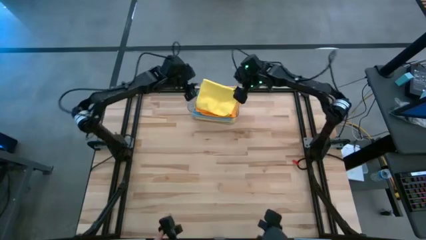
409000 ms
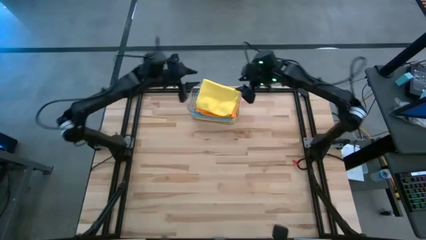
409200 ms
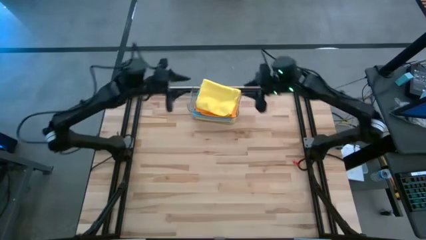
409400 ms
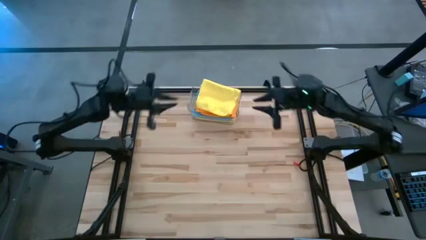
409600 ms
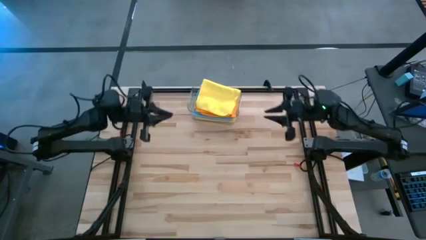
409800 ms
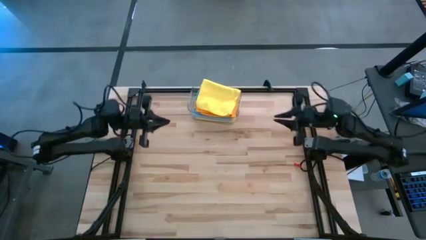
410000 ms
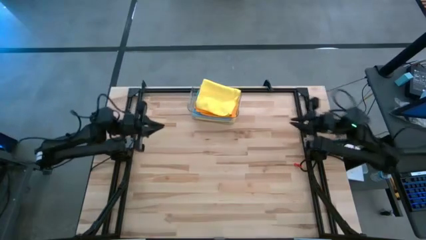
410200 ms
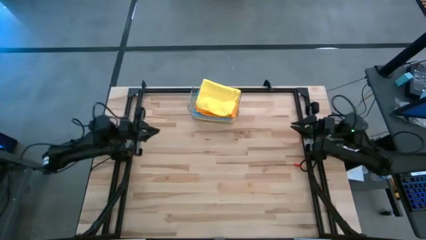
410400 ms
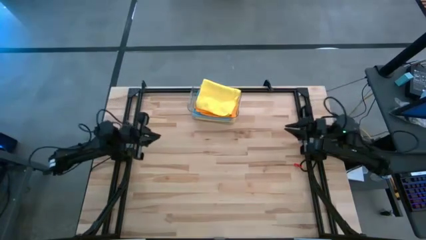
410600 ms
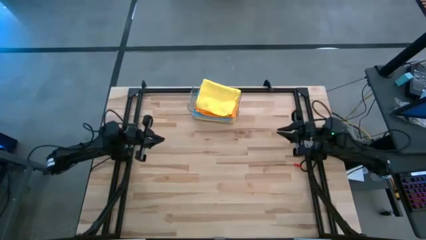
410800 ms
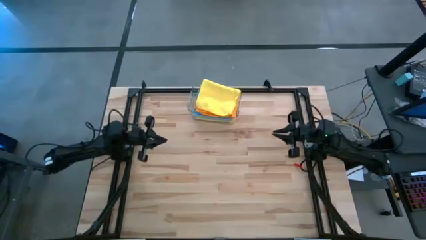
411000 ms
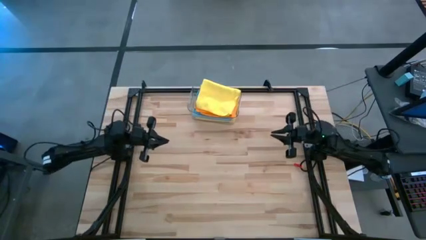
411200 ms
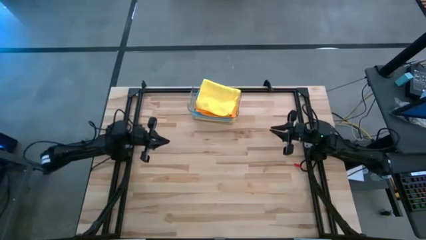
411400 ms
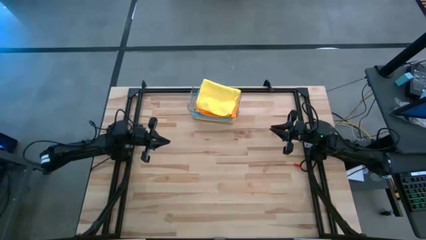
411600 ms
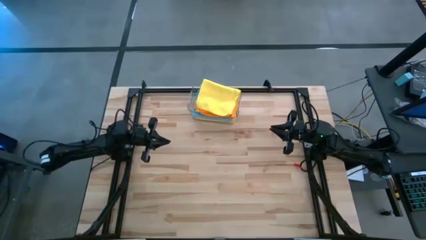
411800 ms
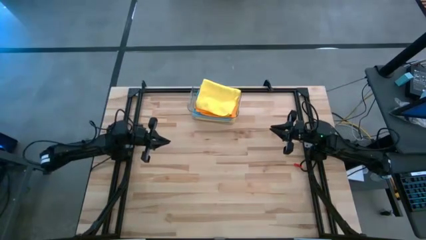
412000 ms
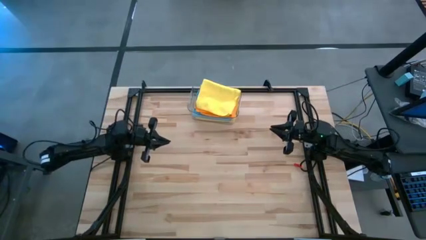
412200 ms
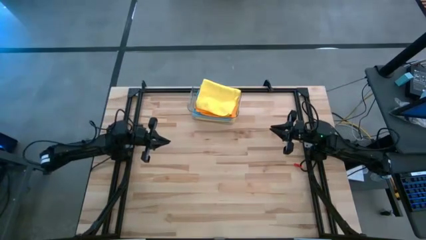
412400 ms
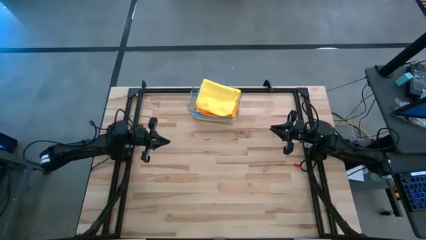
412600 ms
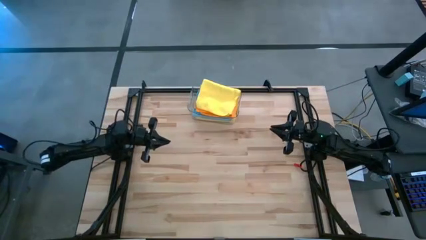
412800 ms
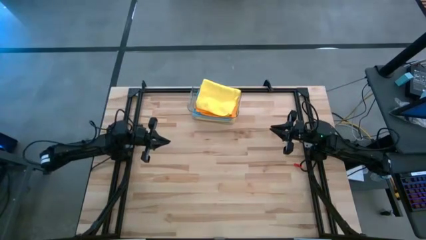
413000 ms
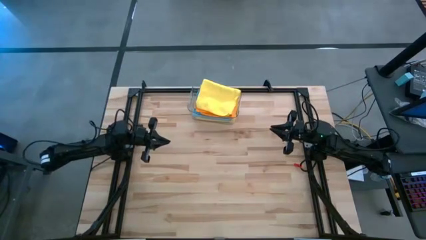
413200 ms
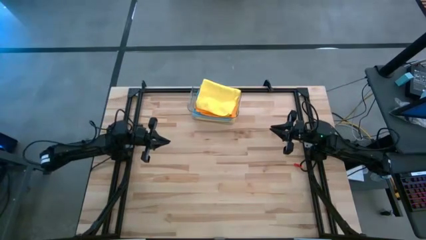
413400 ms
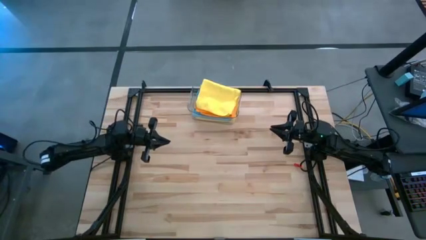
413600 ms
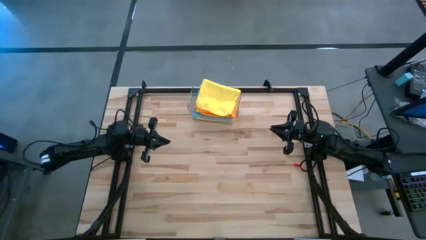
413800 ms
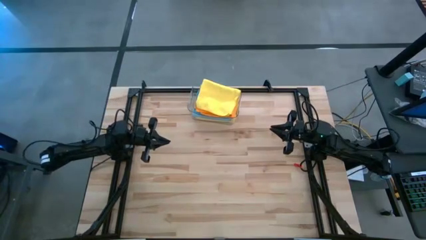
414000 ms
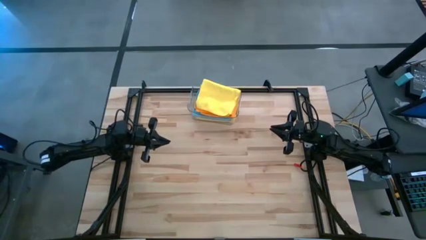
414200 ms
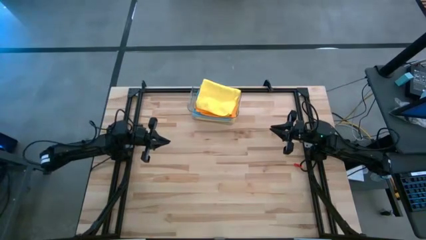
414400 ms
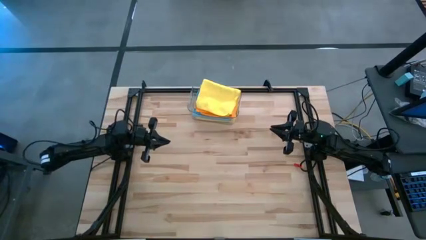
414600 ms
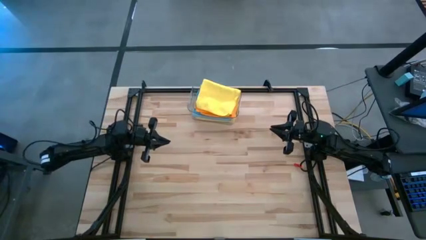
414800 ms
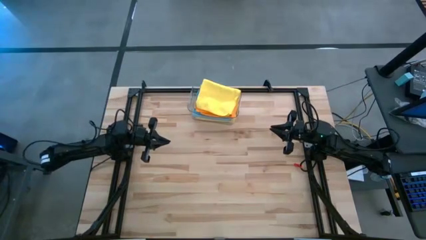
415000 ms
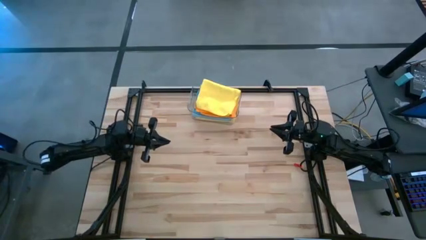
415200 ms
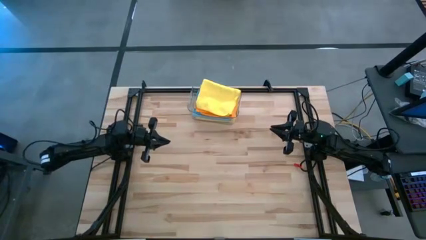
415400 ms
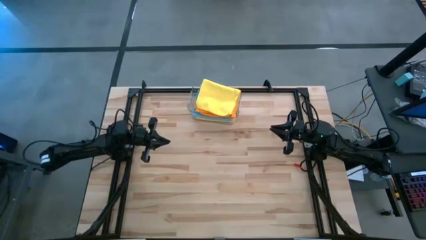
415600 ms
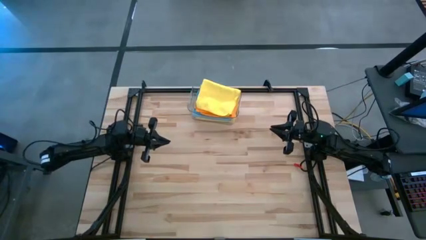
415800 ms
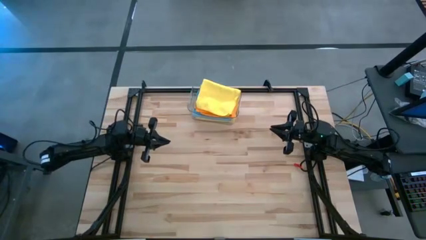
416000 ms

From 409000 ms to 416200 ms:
Task: Fold microfiber towels
Return to Home Position

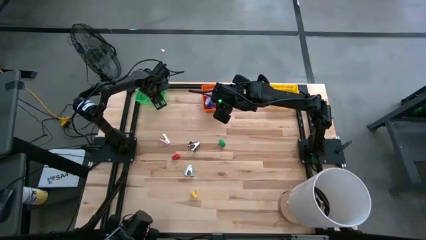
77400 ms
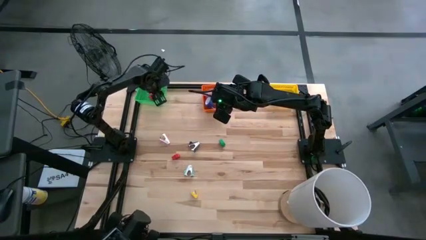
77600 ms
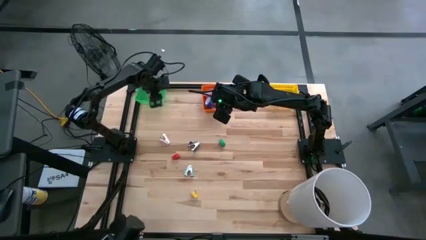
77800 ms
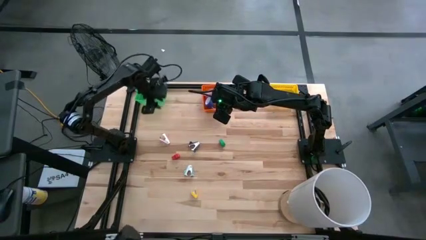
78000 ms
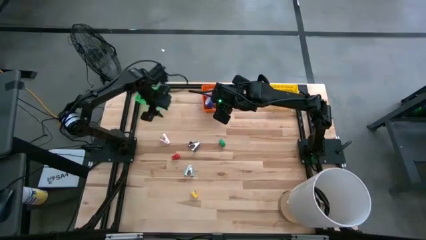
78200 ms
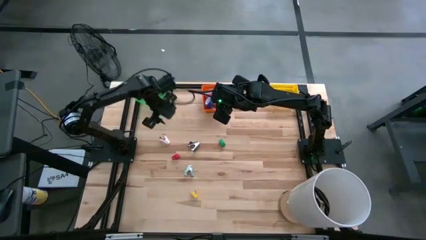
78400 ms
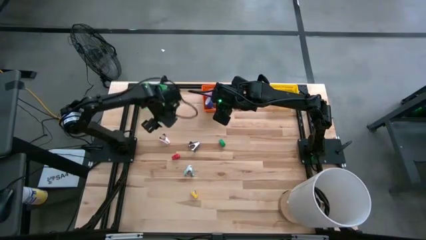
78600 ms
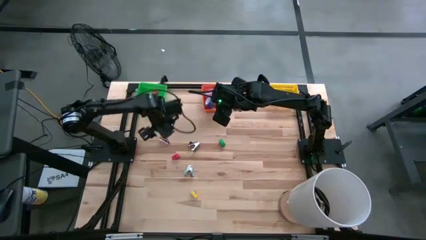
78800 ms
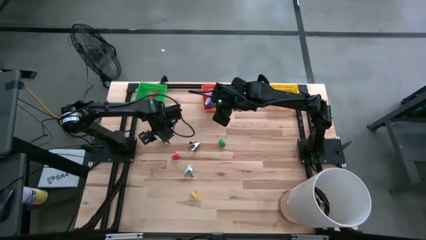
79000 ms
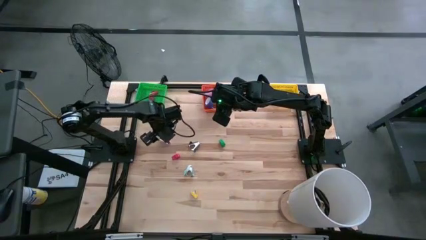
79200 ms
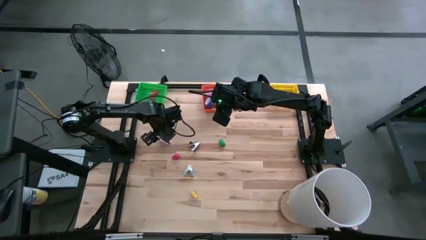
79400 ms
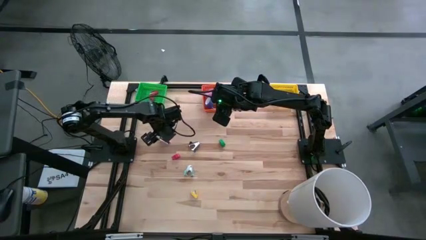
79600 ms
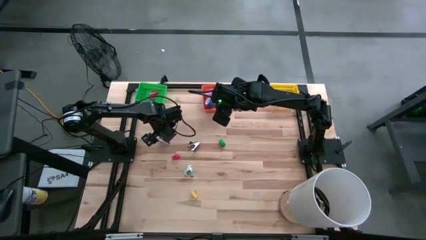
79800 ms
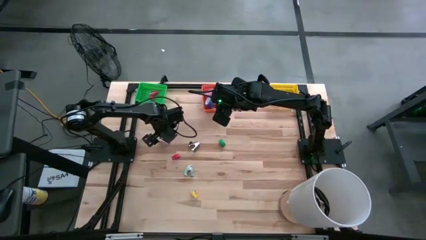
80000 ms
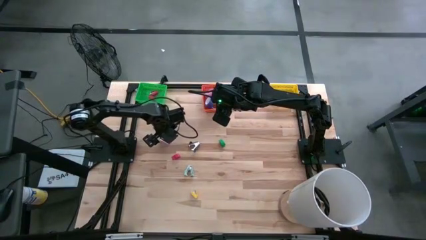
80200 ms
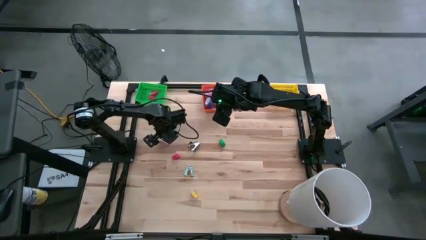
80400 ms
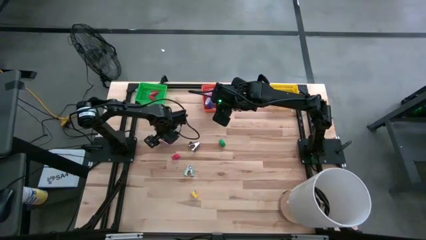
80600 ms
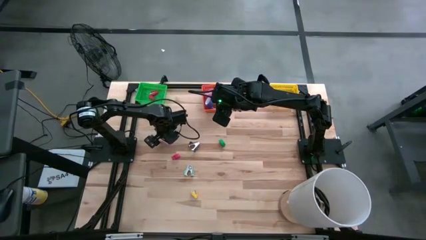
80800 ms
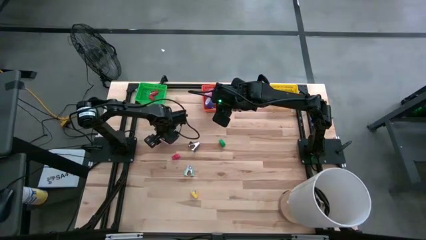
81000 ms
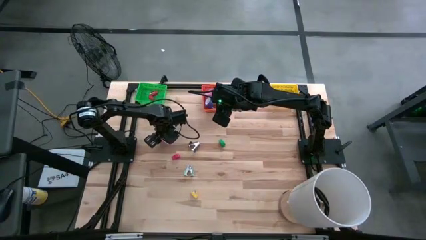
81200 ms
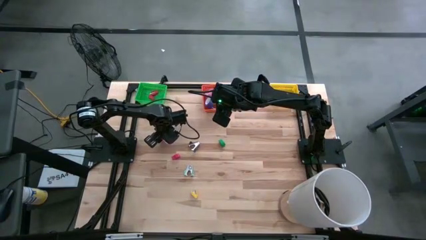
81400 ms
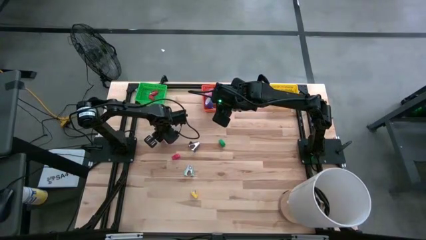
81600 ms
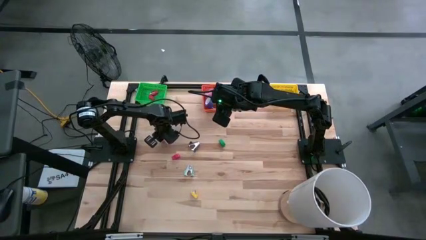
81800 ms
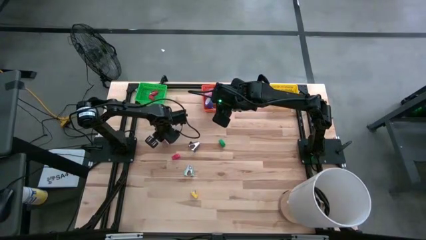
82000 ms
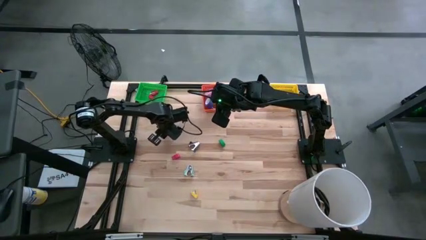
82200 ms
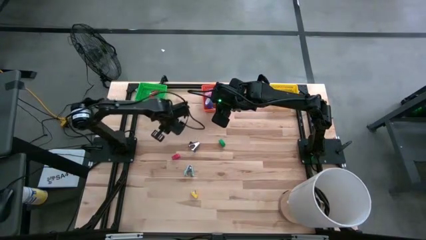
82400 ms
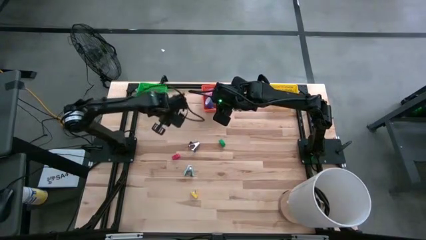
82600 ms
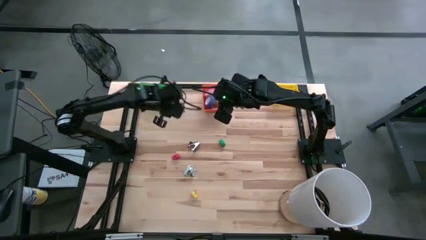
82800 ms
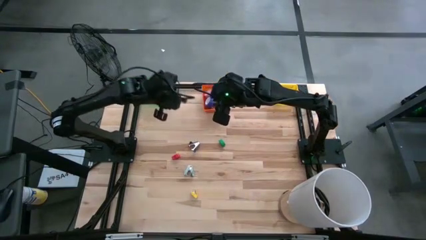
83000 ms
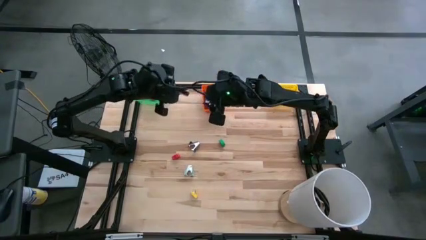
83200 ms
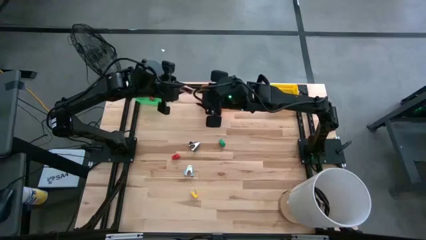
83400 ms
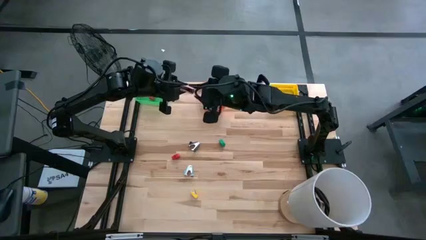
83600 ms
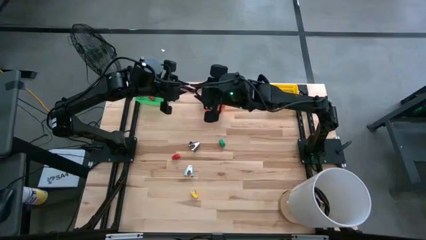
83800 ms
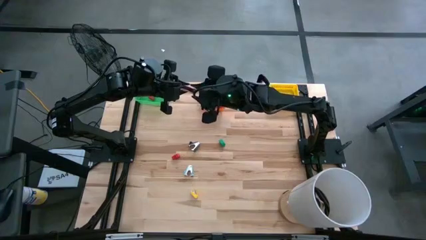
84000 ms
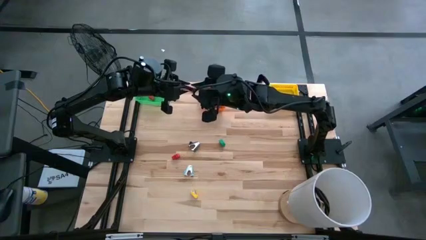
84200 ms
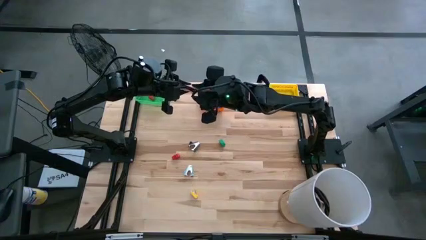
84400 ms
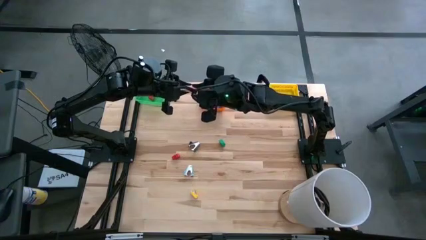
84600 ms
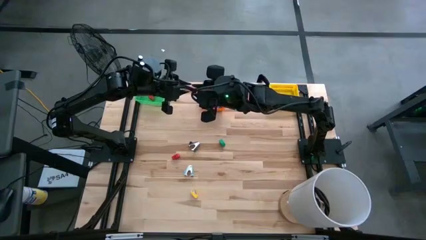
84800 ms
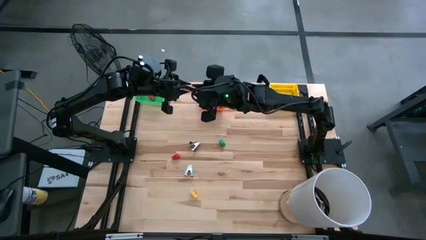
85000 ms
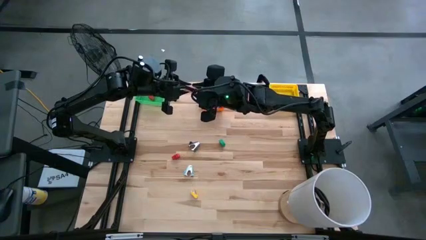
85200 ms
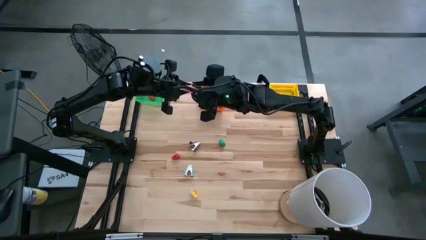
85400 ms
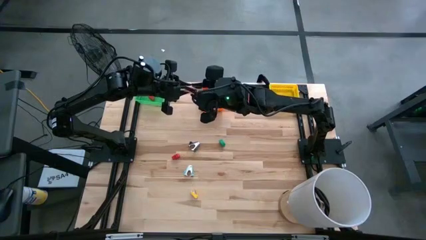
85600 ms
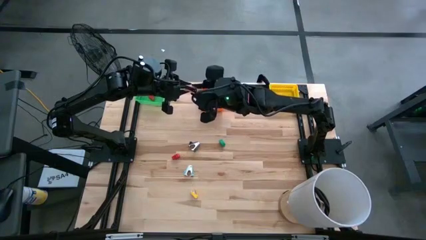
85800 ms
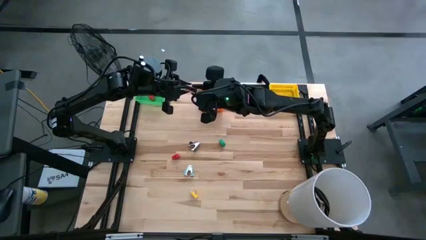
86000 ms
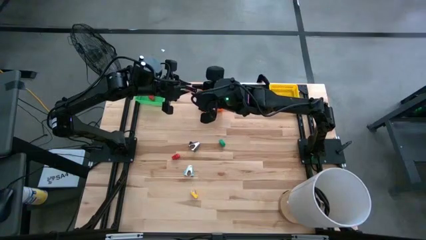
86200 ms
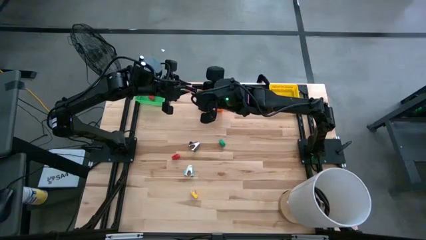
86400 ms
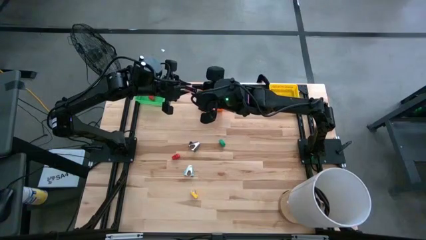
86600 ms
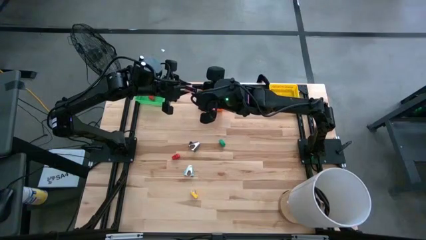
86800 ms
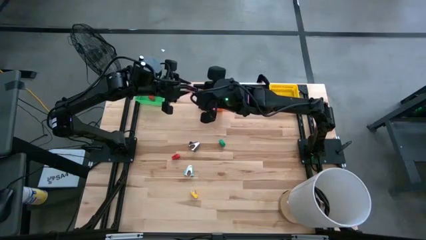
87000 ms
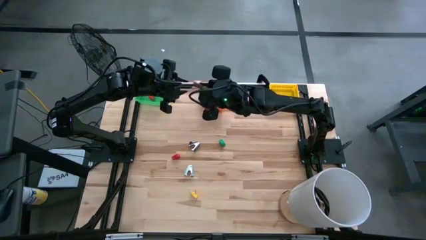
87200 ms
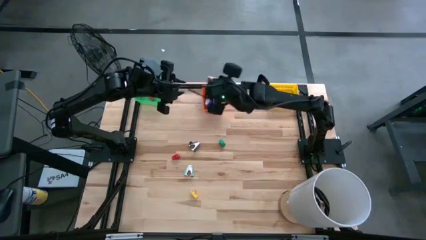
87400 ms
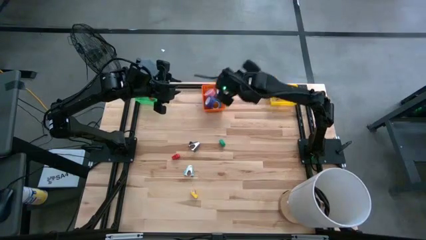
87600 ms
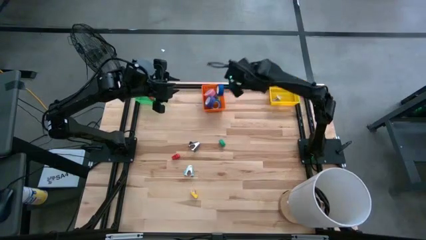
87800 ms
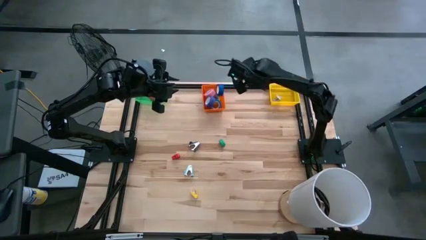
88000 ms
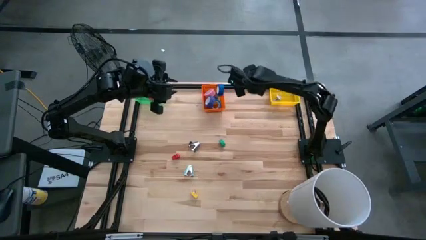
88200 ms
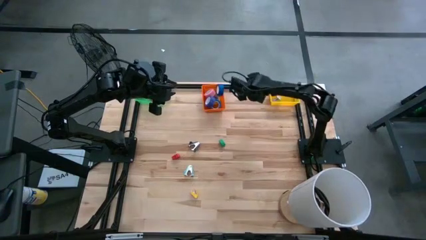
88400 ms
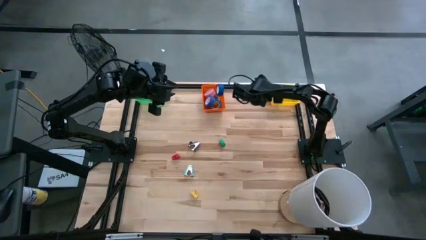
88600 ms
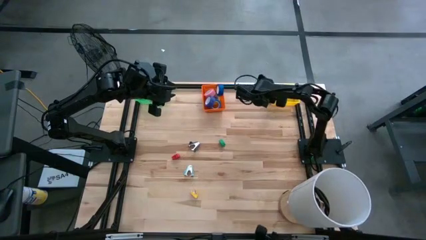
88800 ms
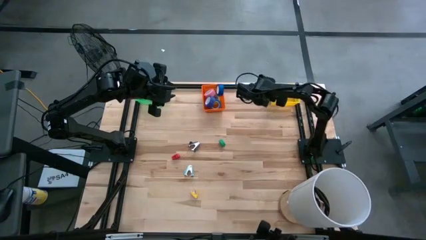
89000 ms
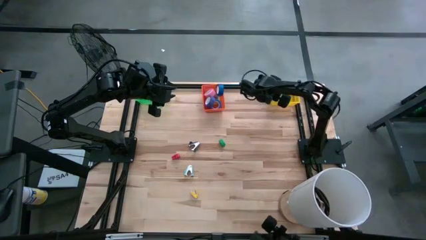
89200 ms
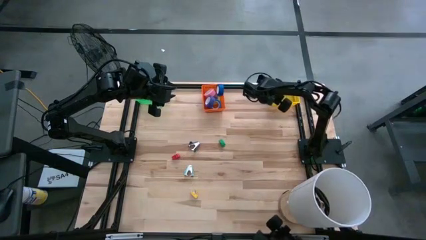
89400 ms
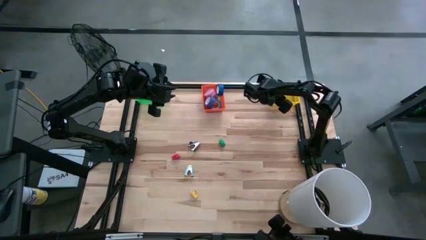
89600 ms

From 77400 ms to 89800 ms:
Task: Pick and place Stapler, Stapler remover, tape
Put the pink staple remover into the yellow bin
